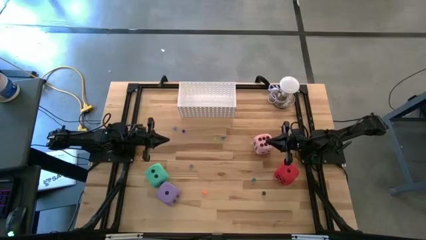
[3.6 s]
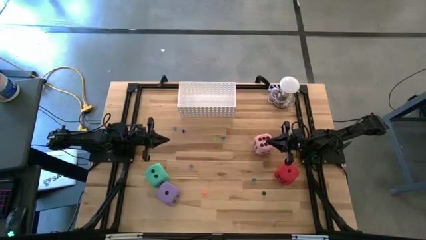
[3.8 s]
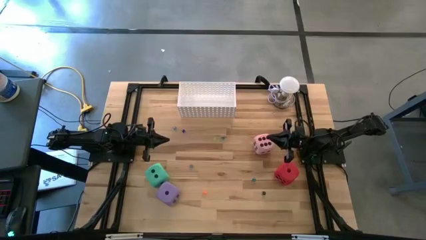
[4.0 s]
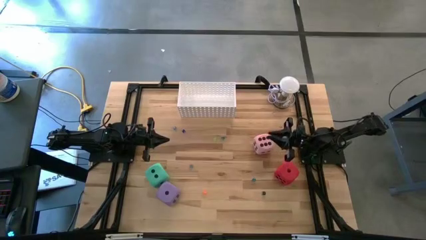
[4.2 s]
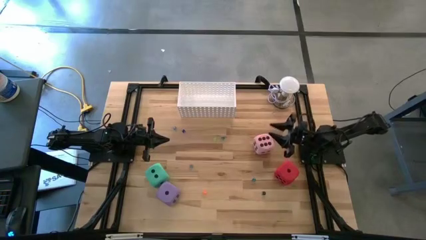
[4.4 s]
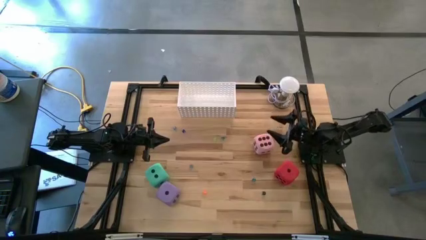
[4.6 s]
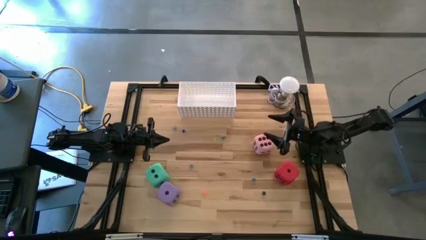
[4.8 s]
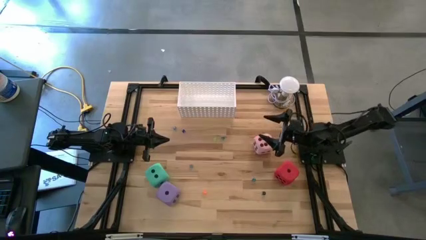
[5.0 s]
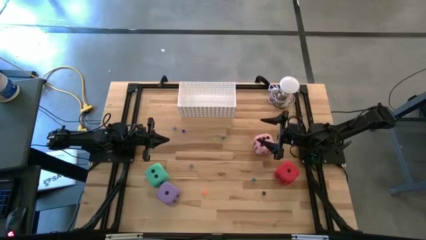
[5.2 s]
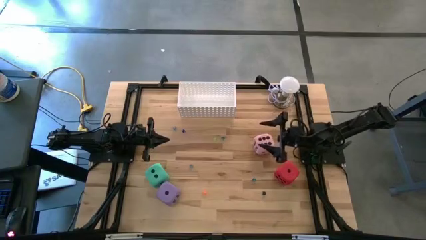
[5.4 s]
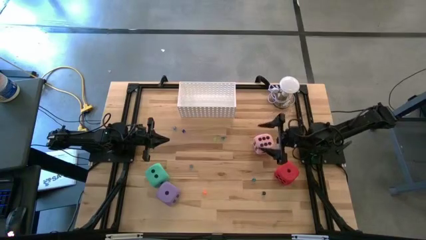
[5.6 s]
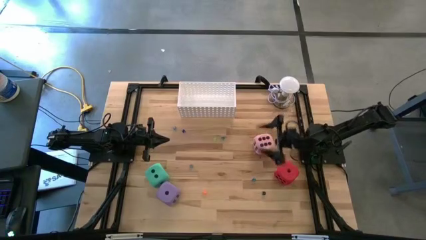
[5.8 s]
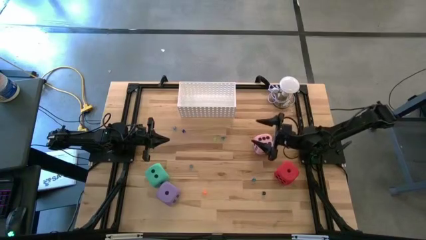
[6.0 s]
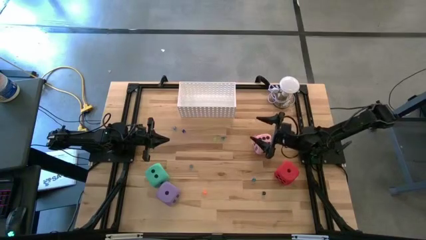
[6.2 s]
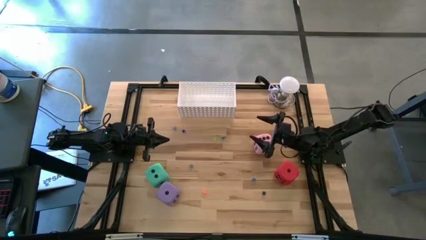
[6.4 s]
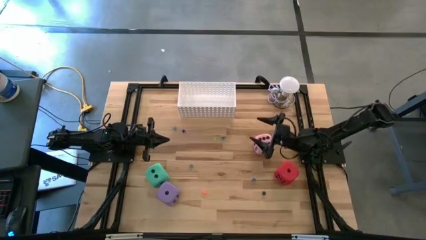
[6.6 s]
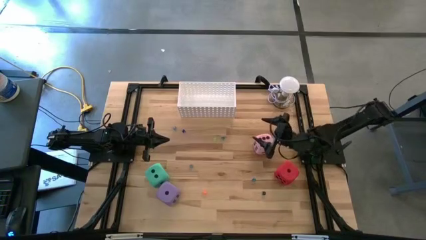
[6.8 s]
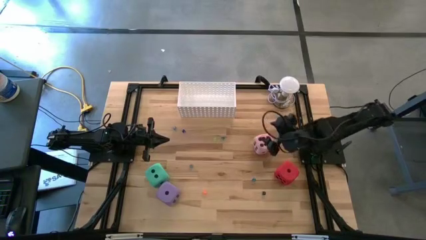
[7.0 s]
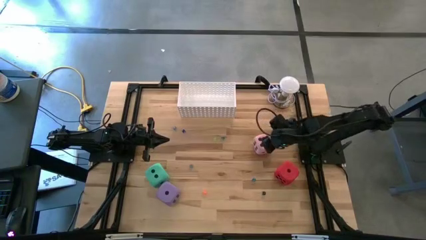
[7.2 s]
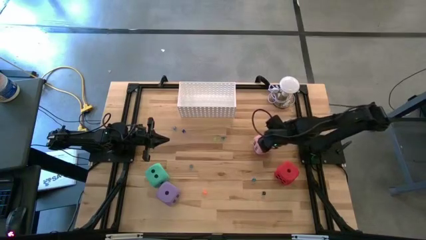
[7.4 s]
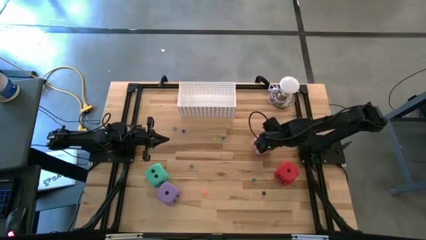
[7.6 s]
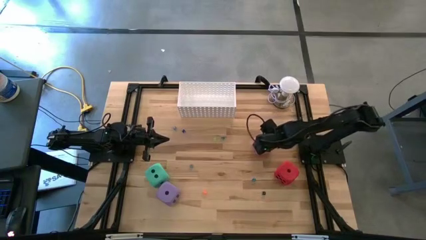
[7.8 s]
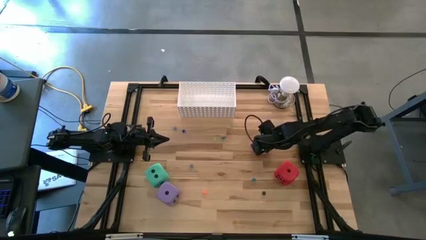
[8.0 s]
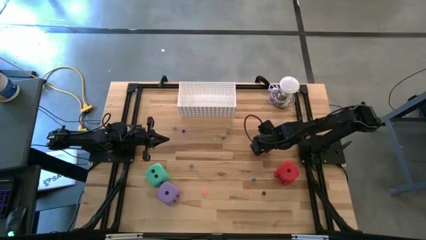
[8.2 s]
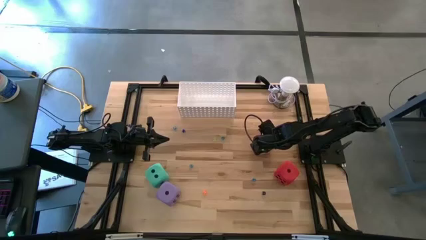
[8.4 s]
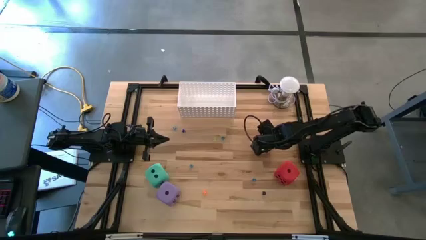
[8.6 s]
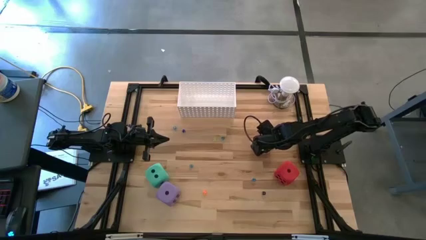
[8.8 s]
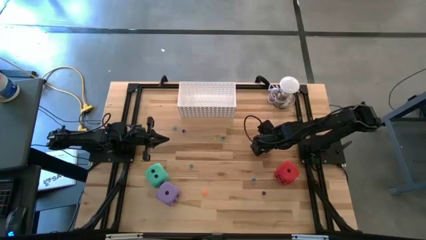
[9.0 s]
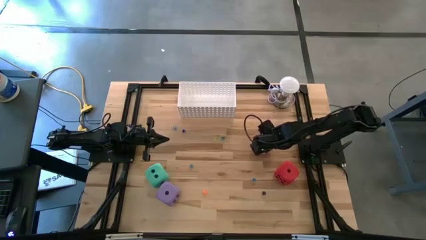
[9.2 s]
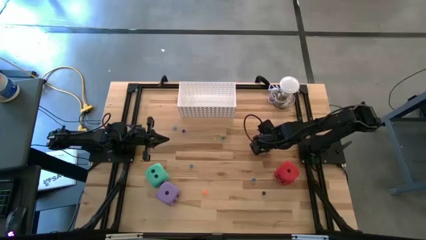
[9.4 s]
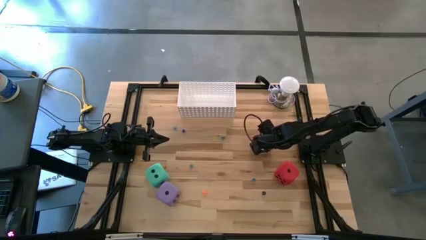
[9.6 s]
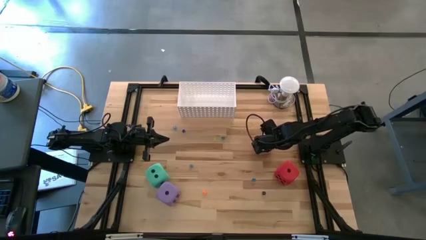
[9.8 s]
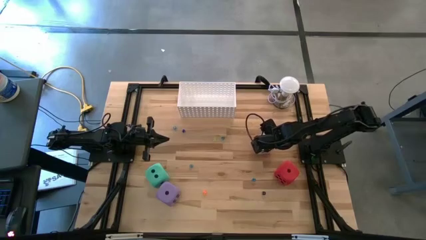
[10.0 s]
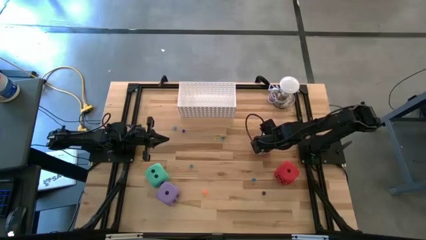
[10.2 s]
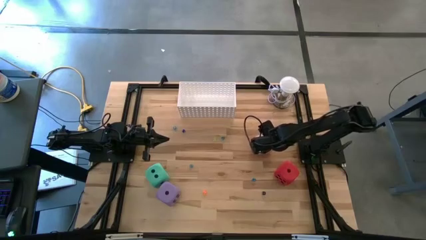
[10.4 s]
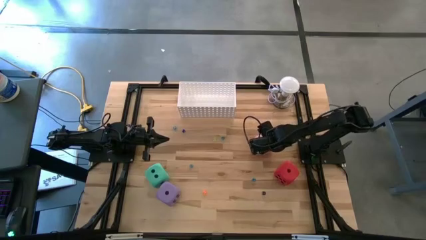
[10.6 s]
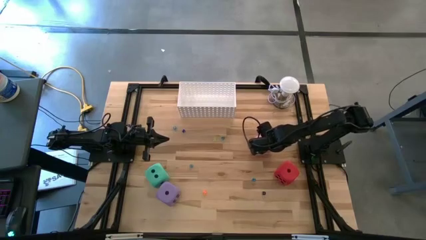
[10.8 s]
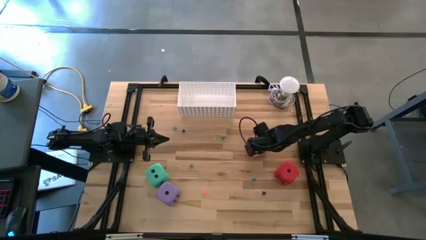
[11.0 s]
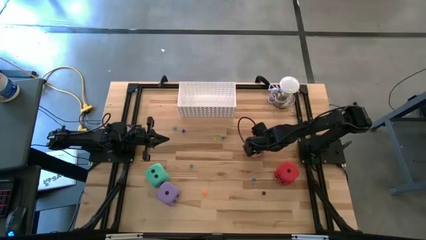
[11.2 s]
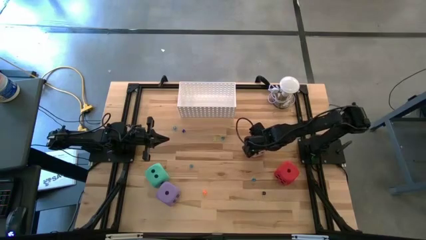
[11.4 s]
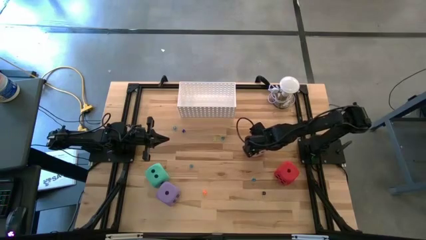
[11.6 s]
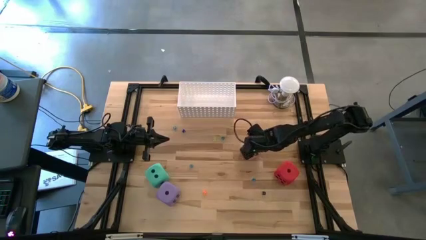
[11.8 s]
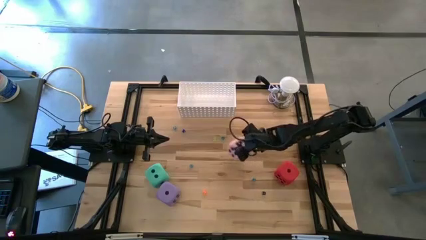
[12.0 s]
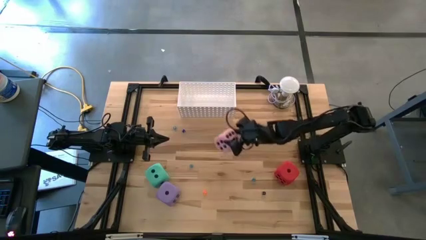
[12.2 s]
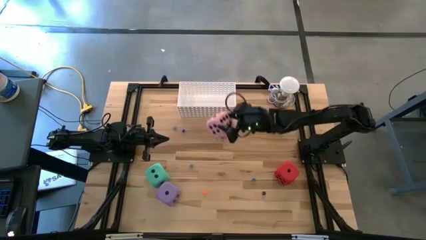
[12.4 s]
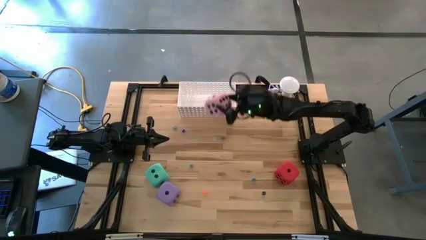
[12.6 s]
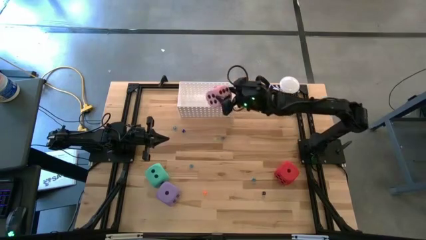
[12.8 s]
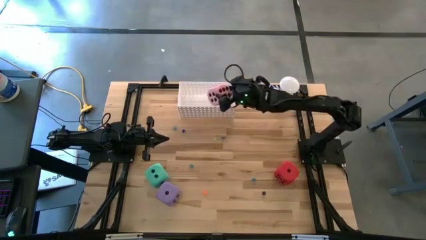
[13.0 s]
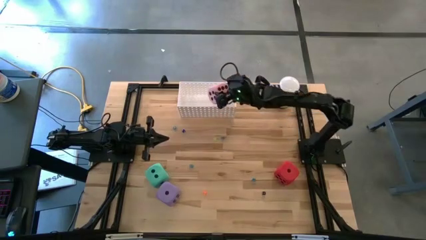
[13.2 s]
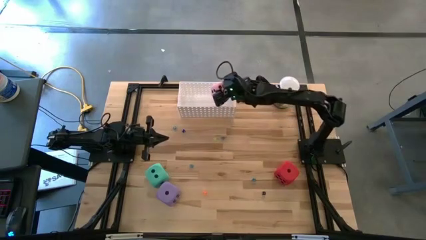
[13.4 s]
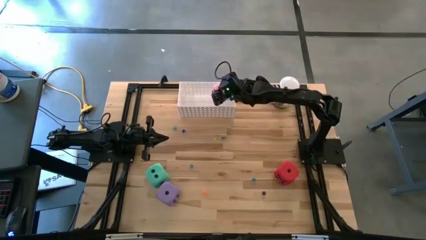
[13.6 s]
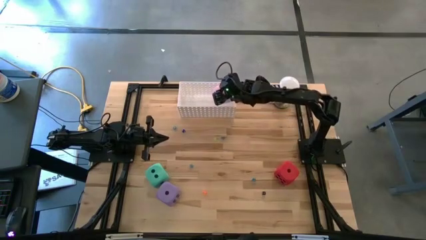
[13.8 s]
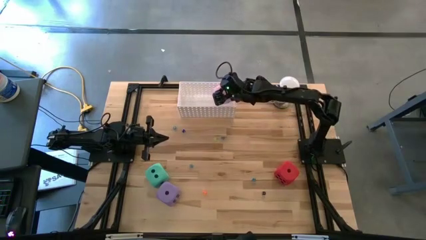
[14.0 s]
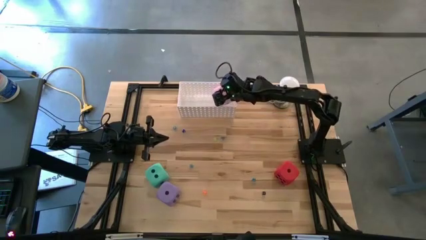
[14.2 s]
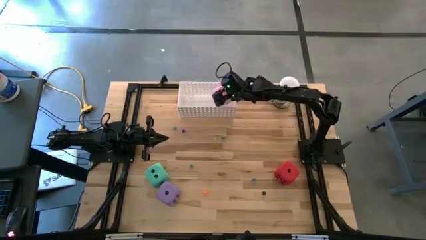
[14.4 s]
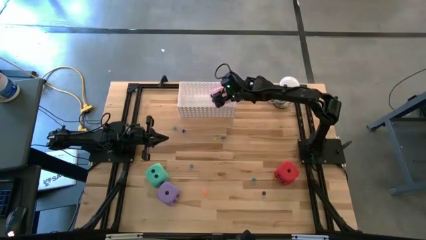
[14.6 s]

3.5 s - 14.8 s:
Task: Pick & Place Dice
Put the large pink dice into the white basket
